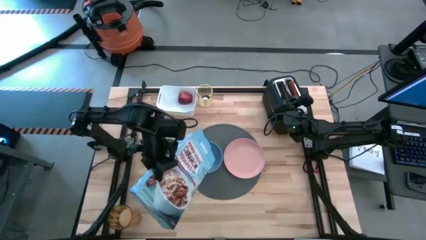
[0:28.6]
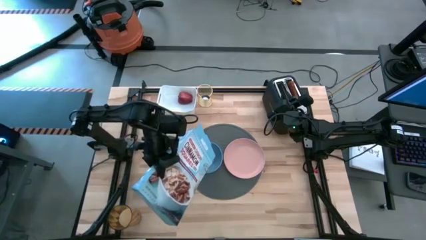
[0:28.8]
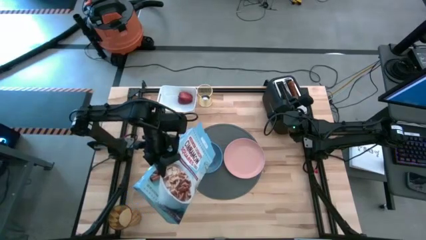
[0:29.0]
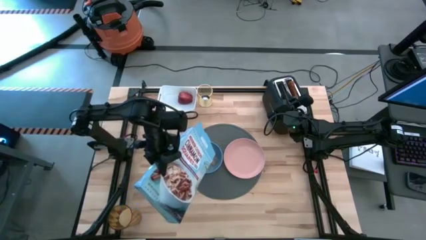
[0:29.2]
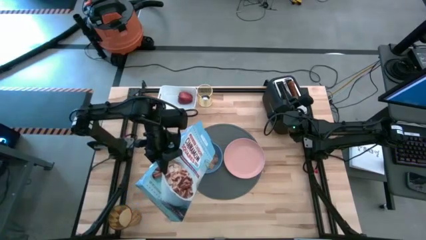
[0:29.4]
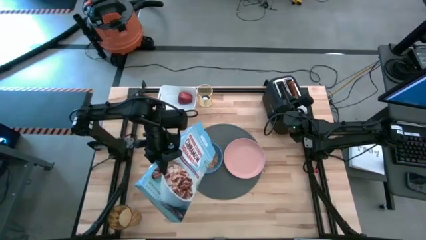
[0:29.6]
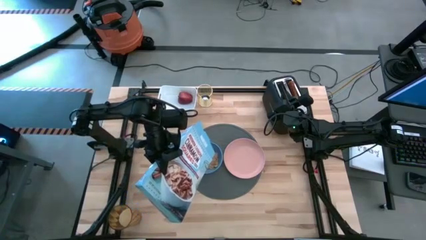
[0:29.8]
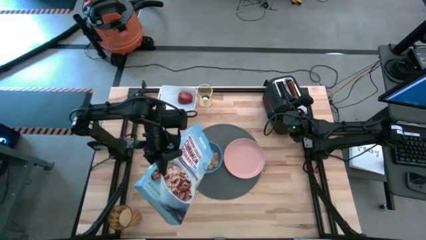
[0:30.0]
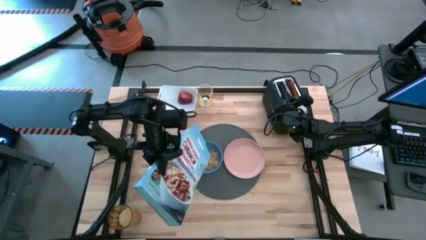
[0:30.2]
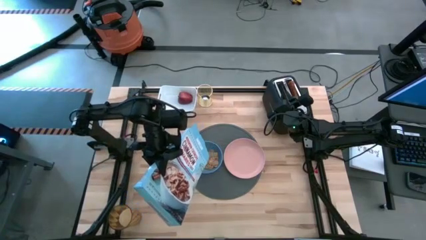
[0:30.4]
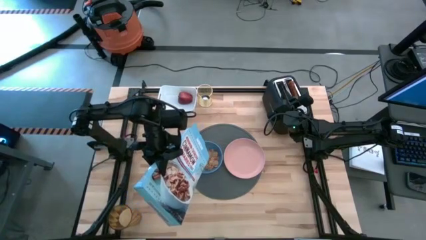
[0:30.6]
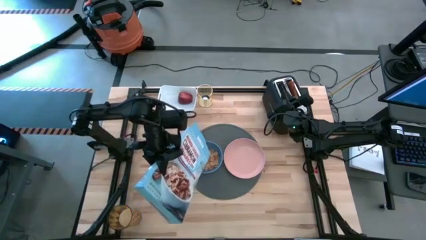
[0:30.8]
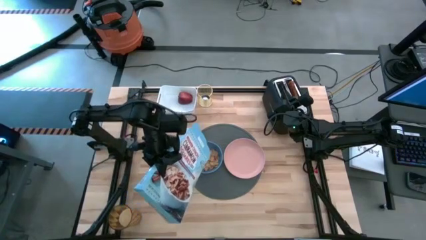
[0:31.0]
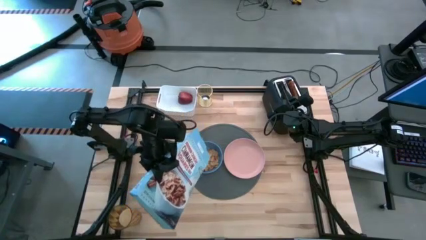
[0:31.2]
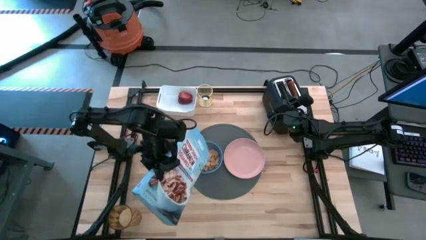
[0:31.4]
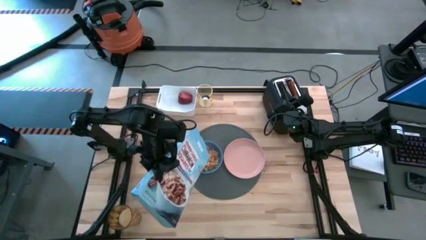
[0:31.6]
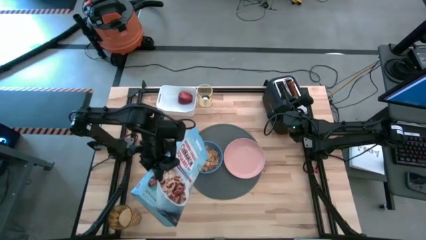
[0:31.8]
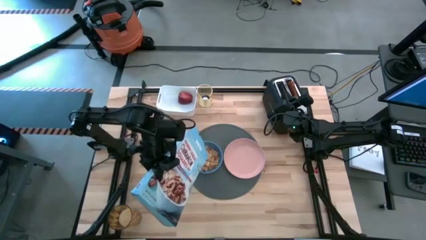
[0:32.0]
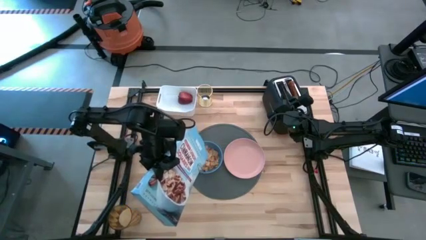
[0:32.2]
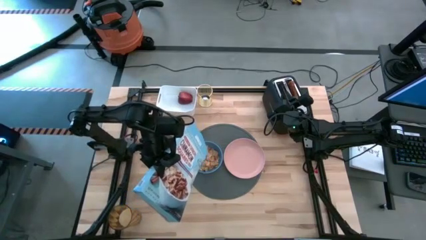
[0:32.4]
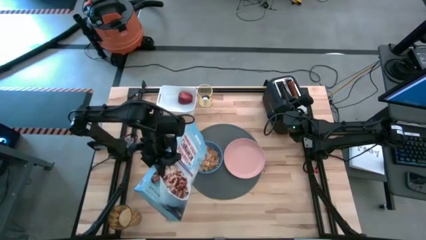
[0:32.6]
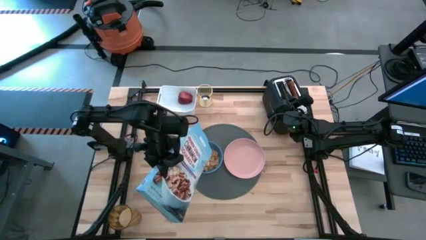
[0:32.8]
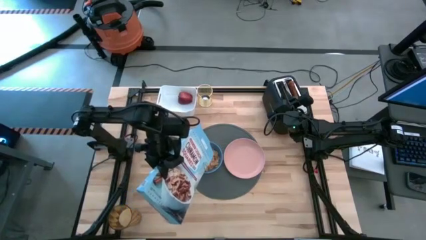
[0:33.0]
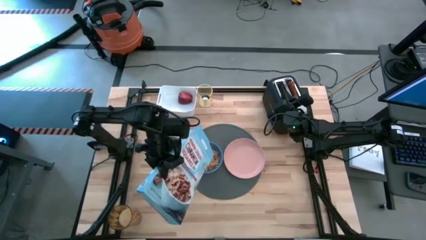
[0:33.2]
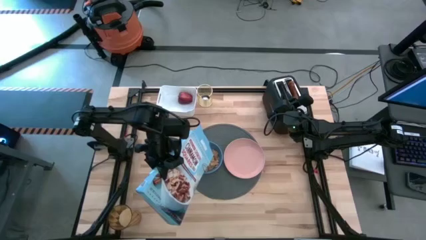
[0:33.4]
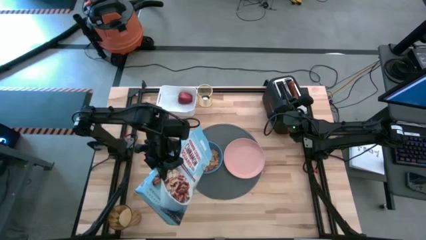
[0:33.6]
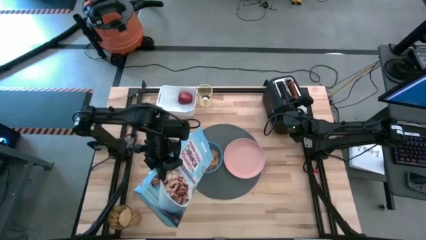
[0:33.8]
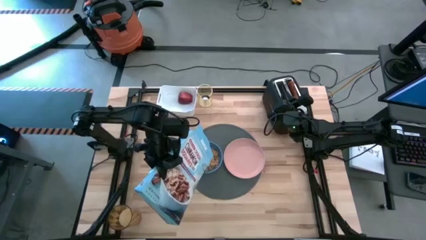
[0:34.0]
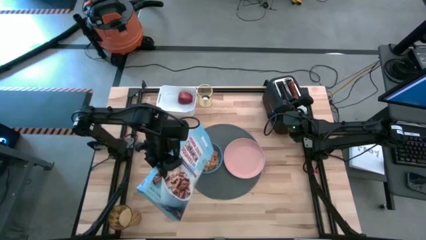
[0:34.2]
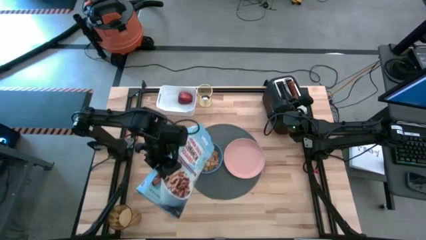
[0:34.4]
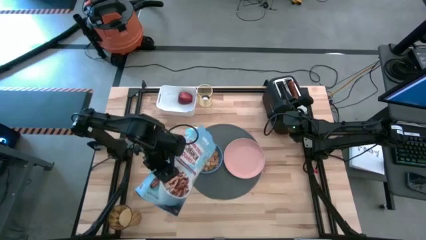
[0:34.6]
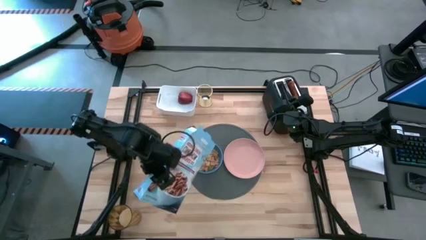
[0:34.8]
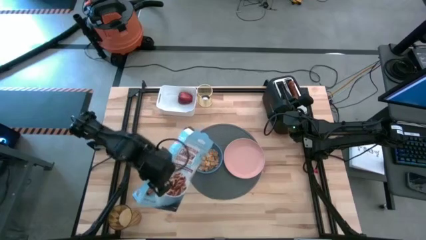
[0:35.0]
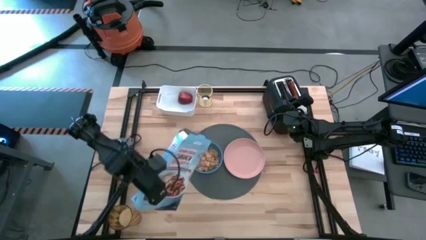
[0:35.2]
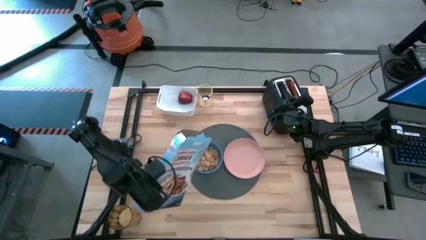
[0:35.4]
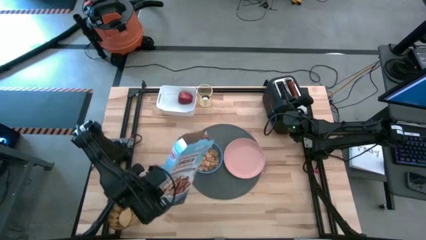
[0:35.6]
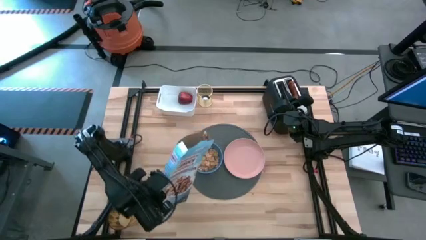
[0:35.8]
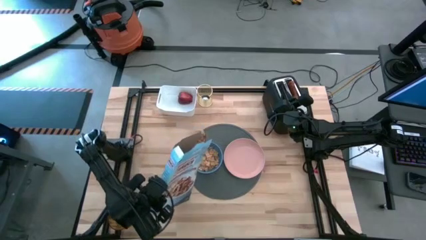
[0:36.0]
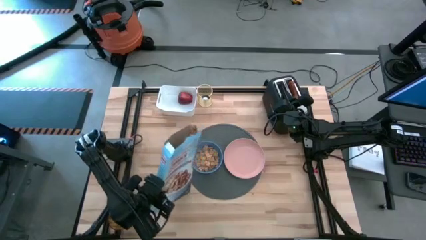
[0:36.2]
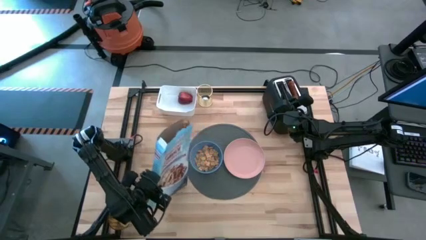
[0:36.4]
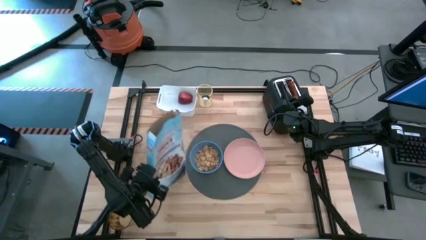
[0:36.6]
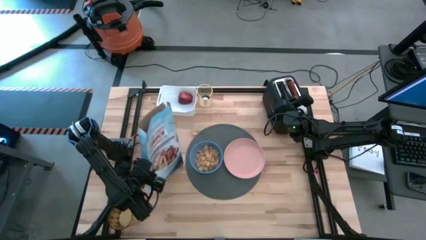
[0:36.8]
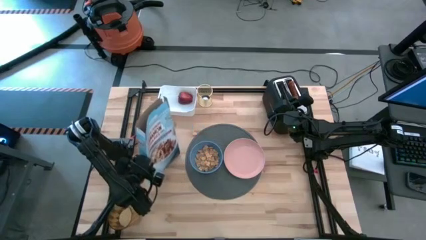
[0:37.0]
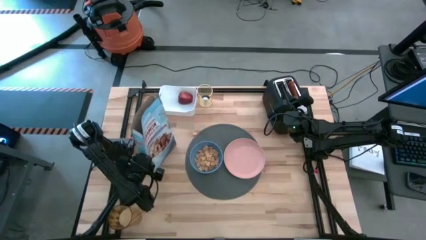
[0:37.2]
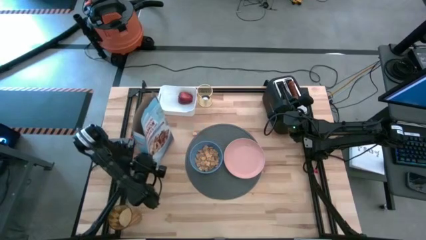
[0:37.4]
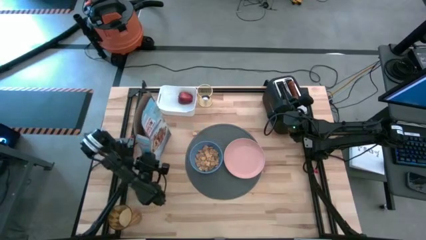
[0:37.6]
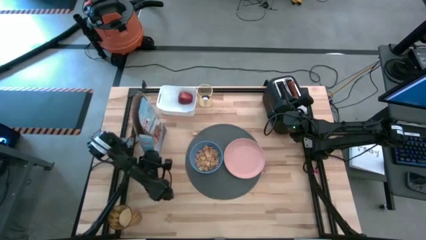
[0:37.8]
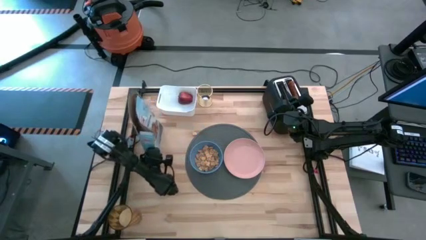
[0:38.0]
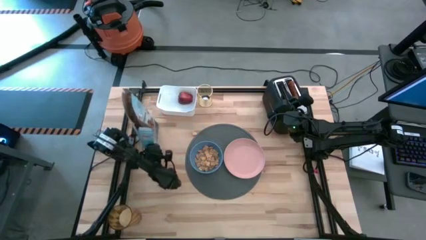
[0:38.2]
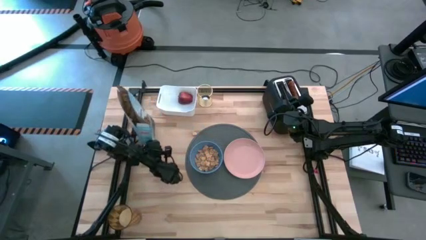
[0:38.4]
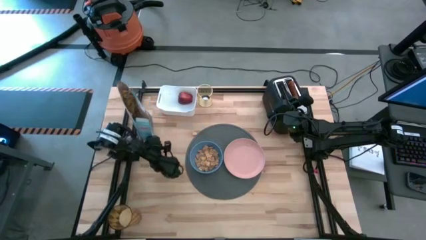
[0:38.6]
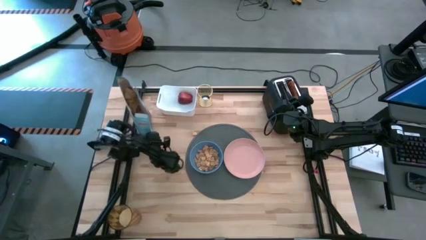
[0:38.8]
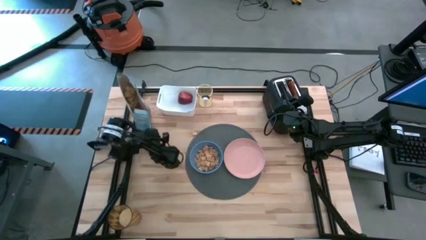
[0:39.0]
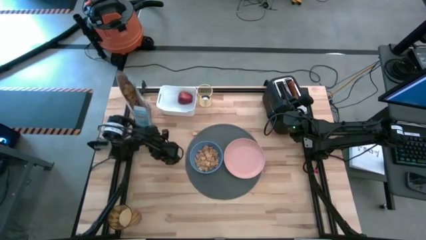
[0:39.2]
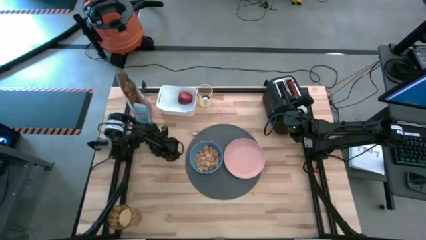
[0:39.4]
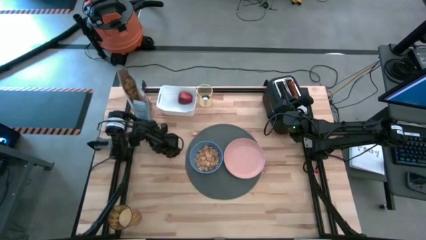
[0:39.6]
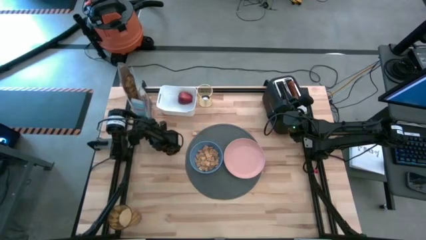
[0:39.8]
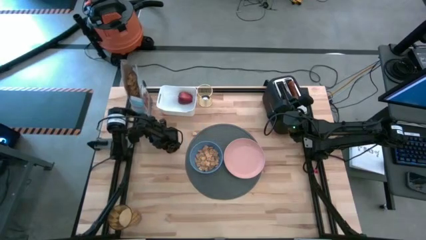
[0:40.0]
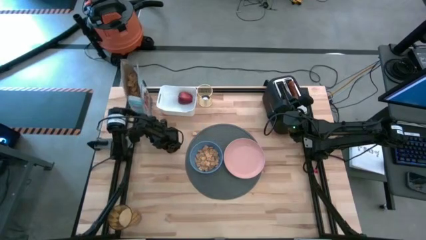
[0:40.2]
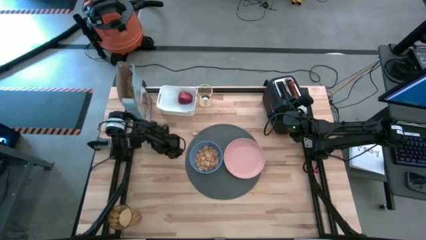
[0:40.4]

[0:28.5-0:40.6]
Task: Arrange a breakfast setting
Pour the cereal from the blue cereal box into the blue bowl on the gray mat
